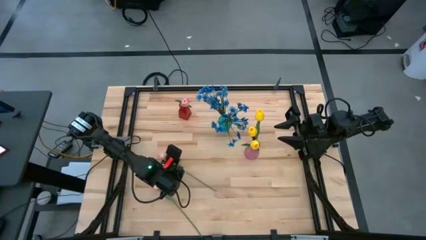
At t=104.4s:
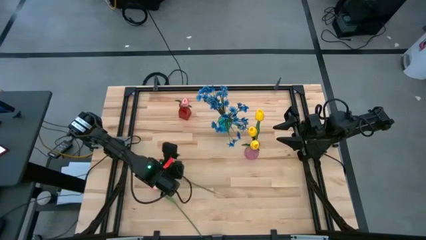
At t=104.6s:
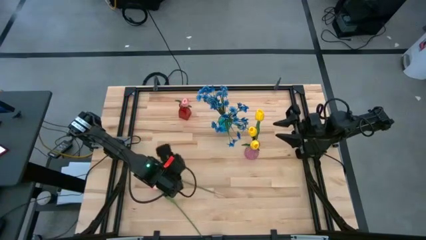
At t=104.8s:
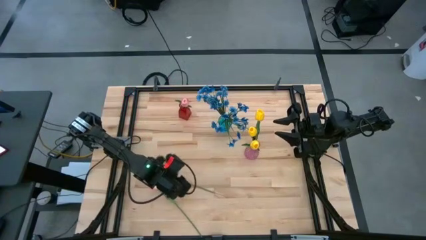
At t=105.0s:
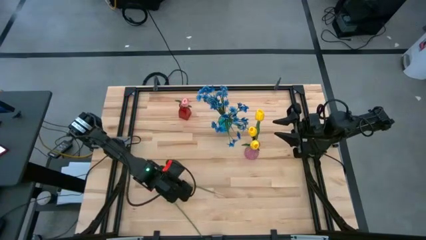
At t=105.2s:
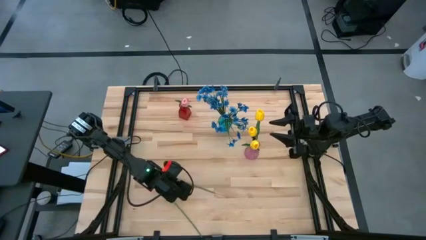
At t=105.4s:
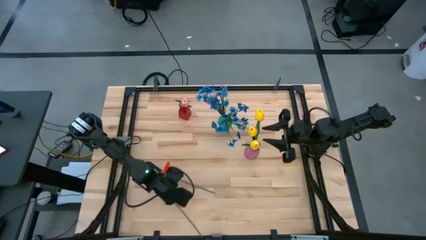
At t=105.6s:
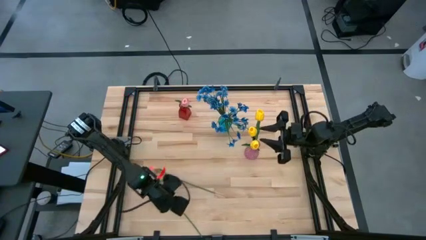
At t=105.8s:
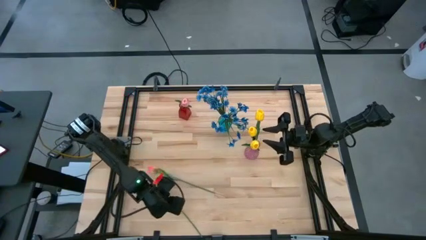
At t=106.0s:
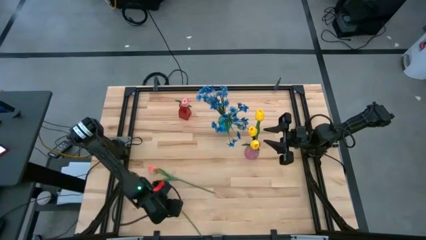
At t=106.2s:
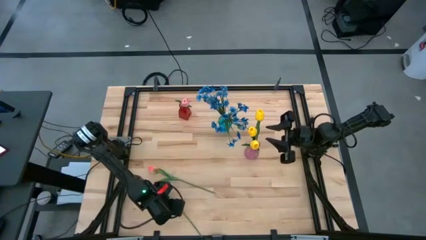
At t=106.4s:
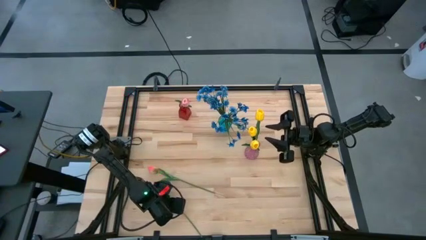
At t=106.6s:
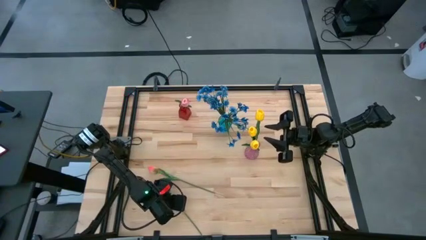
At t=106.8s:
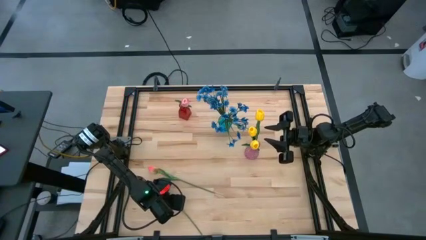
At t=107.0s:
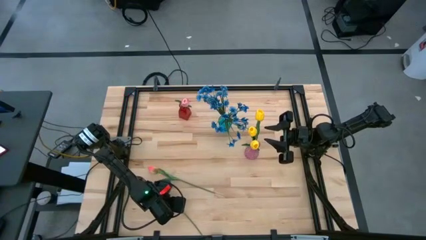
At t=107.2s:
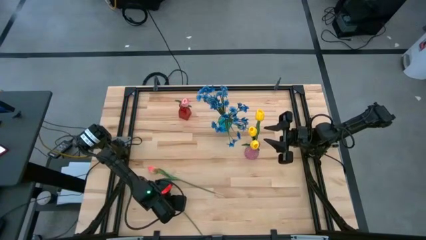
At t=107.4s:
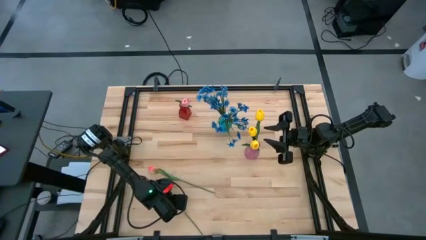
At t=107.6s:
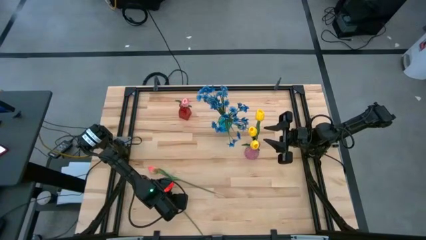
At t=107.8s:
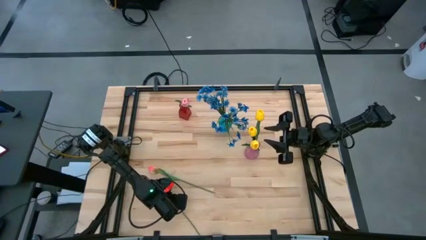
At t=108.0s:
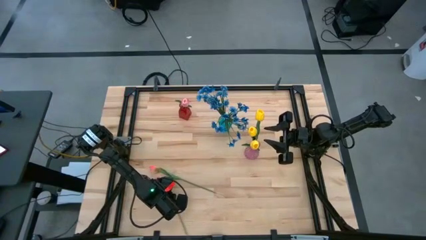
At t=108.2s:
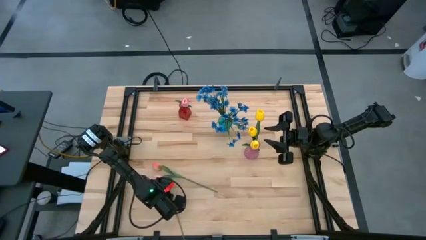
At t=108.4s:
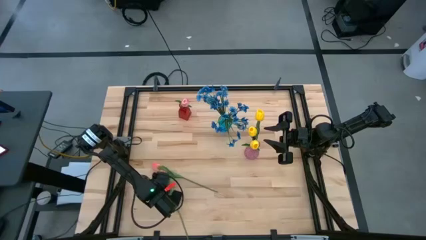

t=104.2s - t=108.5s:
Task: Sort flowers into vase by color
Put the bottom pink tulip into the red flower vase

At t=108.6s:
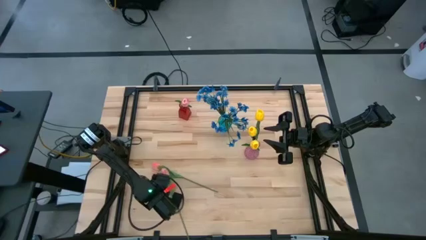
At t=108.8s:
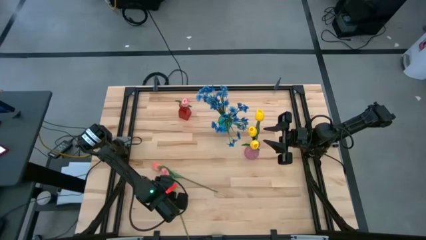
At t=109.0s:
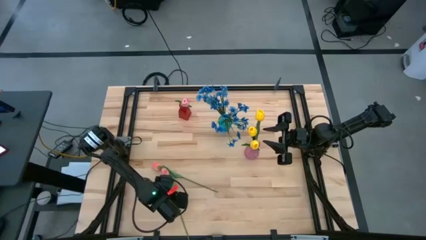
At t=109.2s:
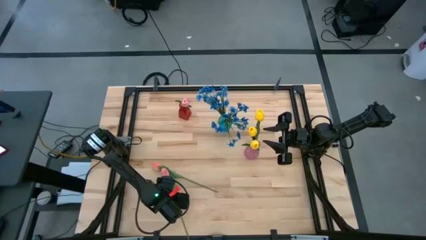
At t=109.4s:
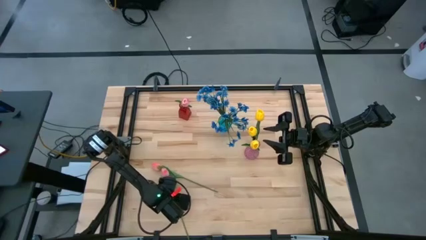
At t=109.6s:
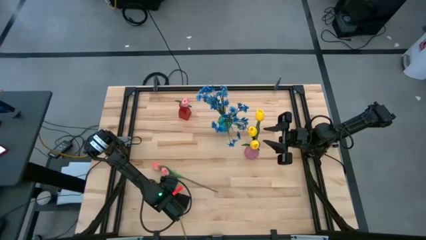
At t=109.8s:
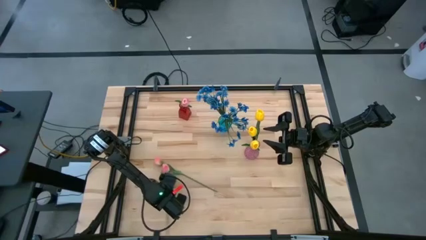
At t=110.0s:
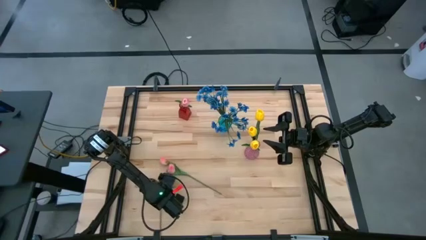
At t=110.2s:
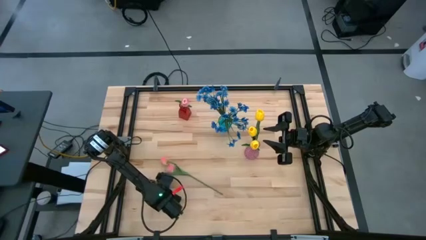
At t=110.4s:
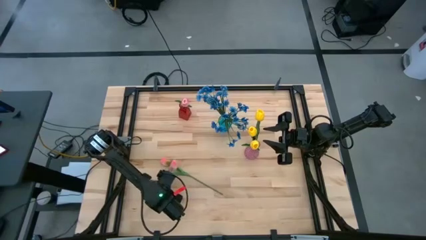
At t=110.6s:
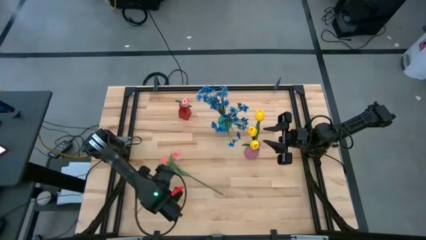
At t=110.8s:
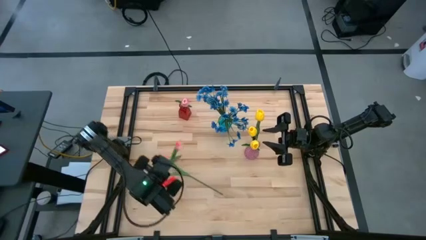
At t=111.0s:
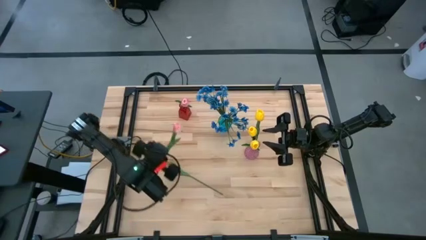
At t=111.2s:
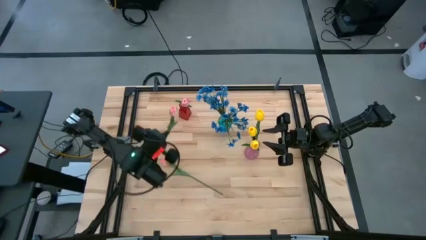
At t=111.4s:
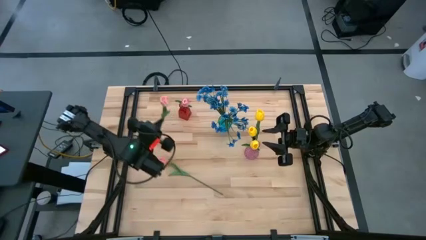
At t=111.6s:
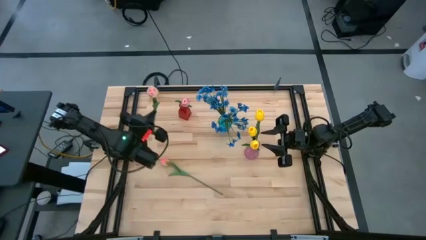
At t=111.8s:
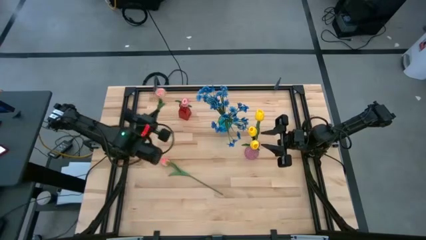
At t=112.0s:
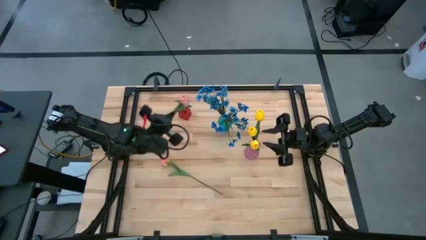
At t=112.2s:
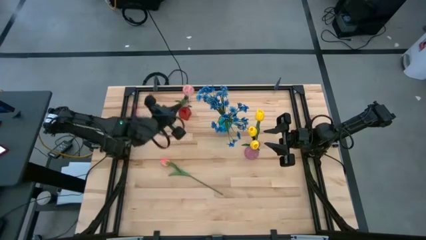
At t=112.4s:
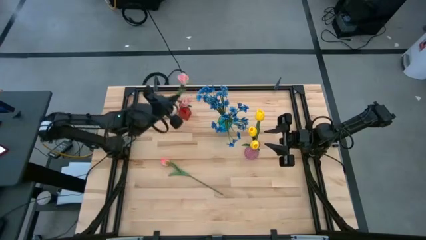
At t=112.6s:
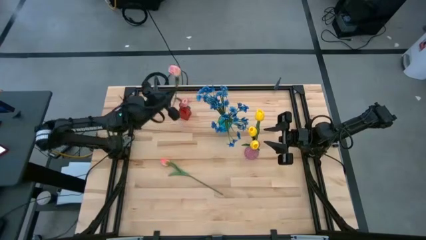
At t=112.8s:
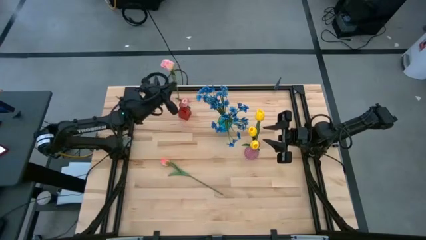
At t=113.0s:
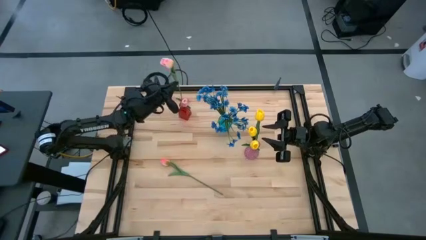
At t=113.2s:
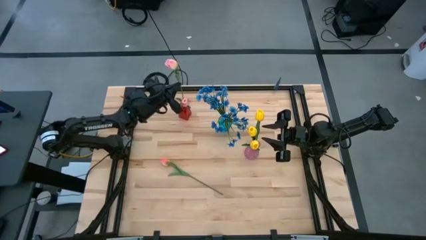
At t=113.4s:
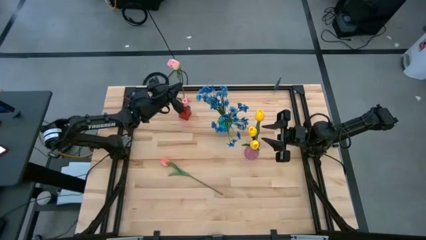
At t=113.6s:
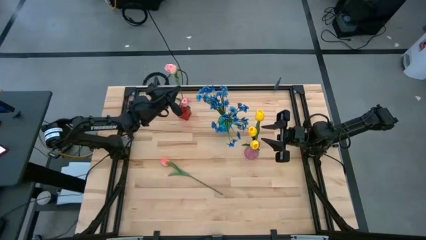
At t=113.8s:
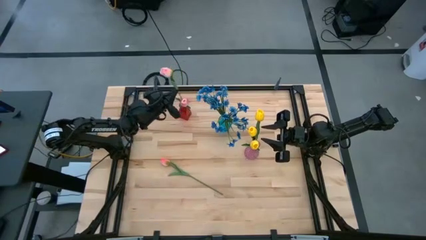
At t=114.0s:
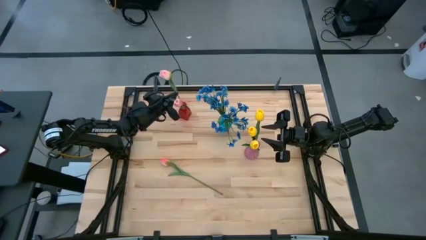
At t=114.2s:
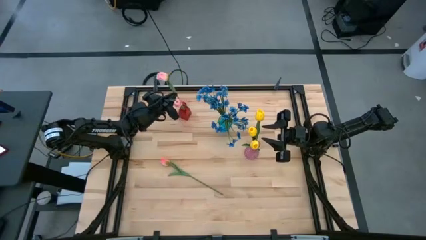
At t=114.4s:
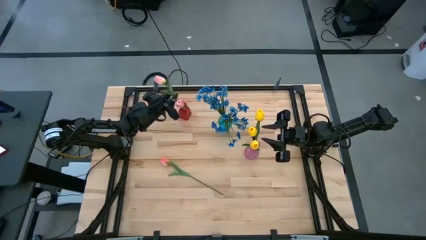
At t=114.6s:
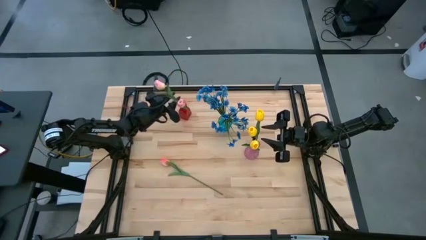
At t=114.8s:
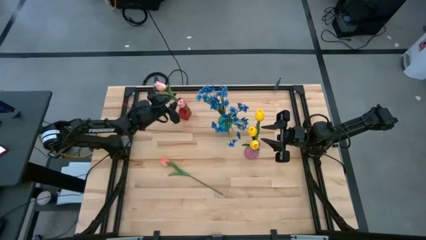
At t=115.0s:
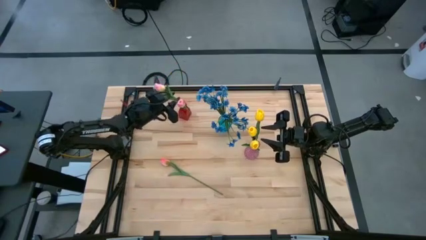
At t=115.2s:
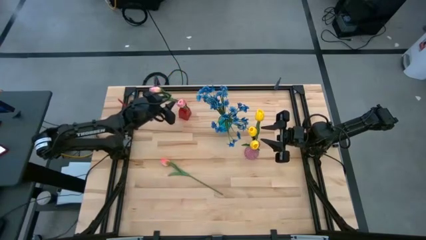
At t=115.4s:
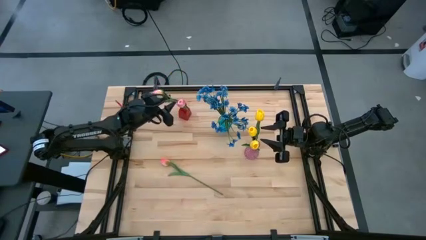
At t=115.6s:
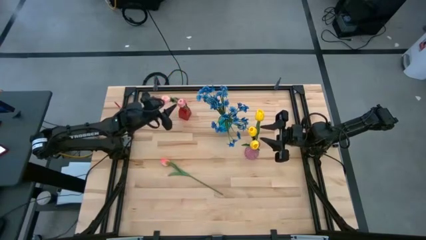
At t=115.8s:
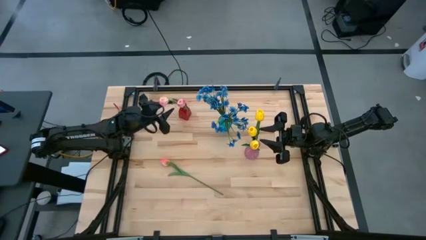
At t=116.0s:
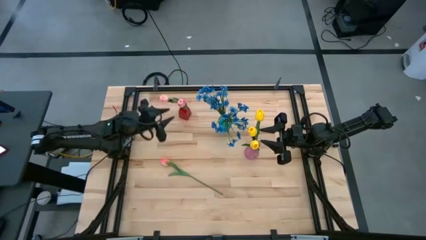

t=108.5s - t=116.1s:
Put the bottom pink tulip into the red flower vase

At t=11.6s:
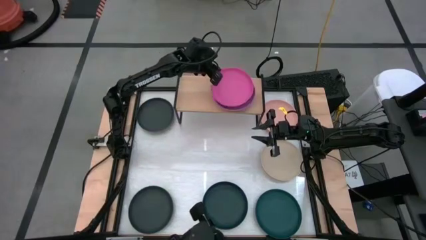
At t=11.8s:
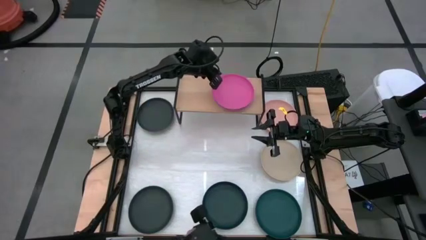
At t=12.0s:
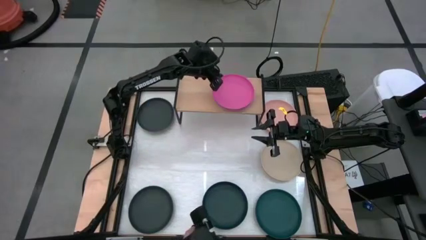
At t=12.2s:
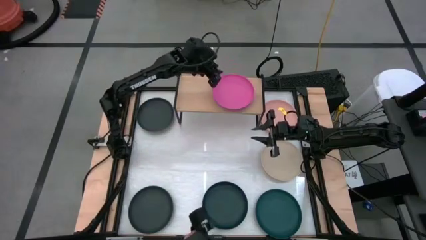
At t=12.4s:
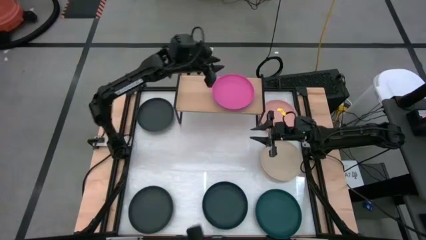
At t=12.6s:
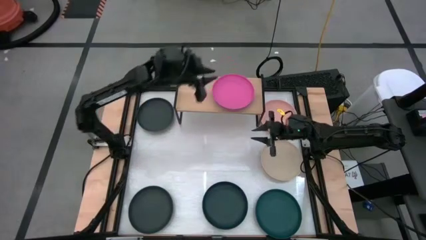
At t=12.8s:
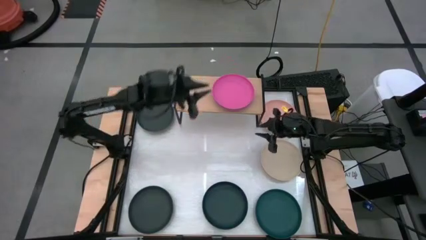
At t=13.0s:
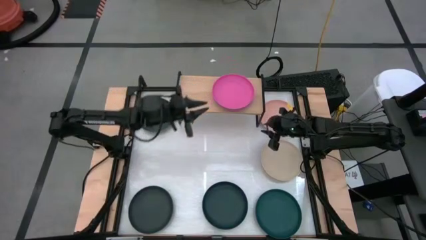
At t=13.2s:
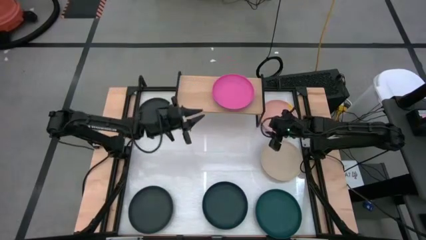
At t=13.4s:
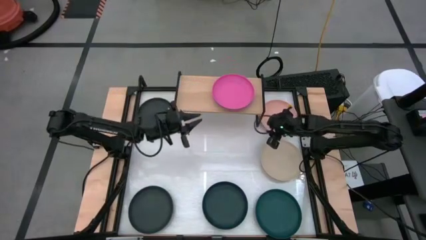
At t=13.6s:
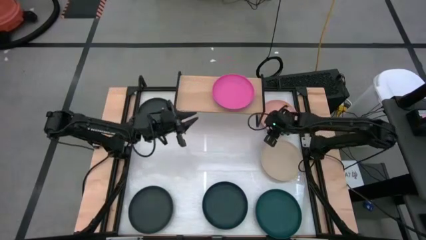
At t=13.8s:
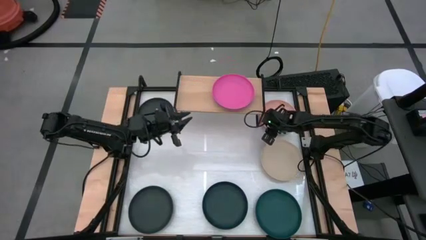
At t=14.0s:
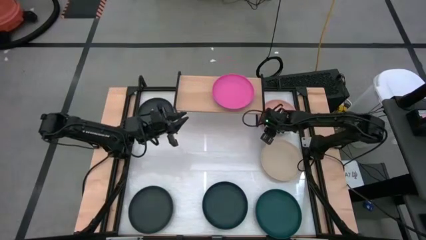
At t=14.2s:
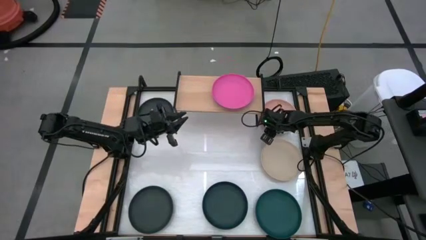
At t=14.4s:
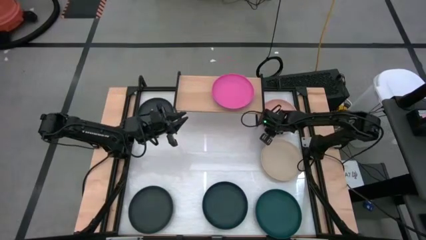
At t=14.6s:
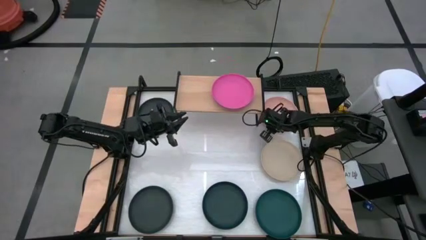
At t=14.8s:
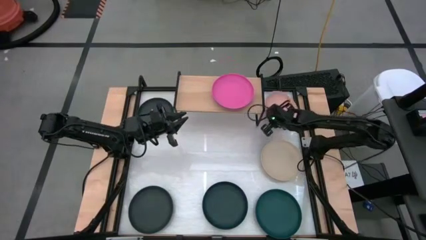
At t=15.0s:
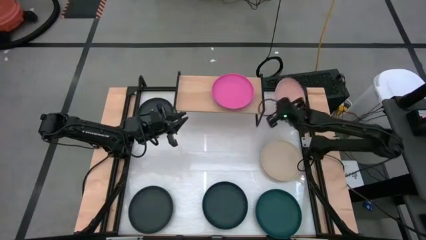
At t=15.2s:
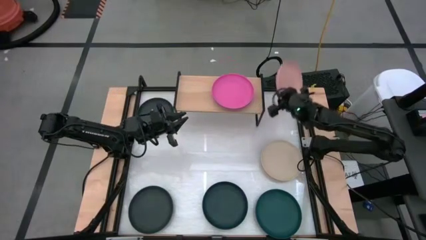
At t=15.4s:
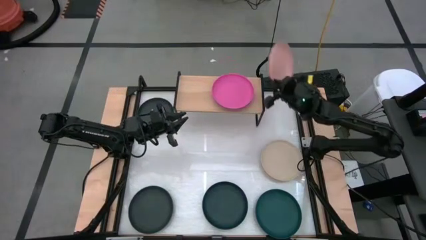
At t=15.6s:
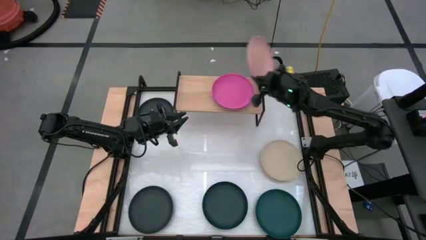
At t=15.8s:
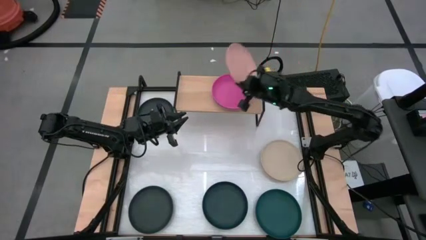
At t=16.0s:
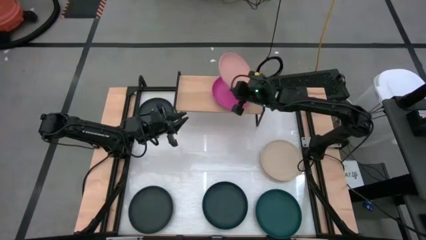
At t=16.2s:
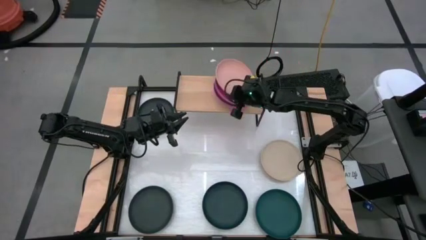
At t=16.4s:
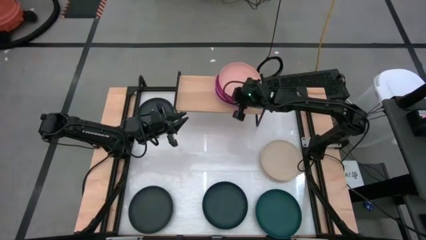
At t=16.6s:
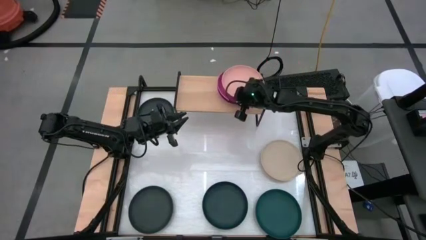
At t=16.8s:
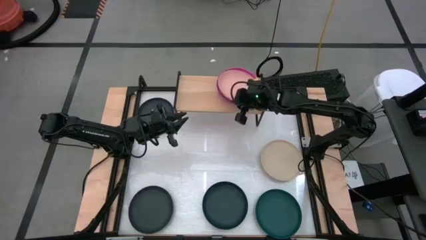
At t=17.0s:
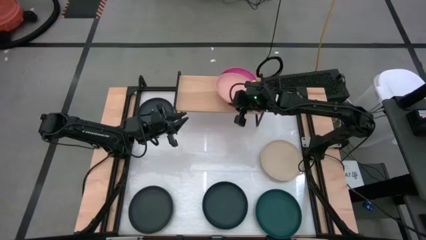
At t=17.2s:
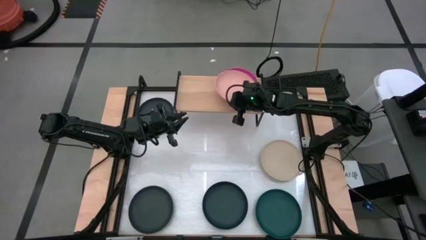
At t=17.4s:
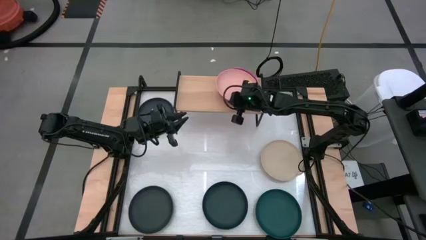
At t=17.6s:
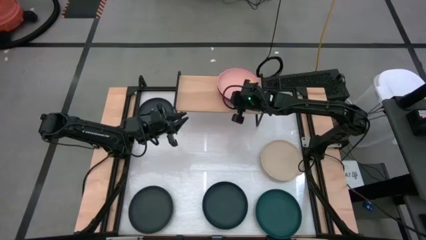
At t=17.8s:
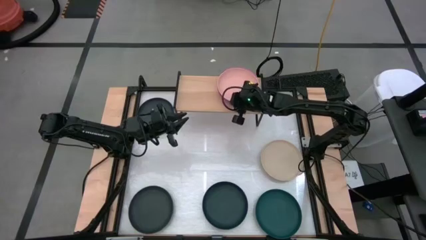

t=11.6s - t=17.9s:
Task: Place and stack plates onto a shelf
Stack the light pink plate on top of the pink plate on the shelf
